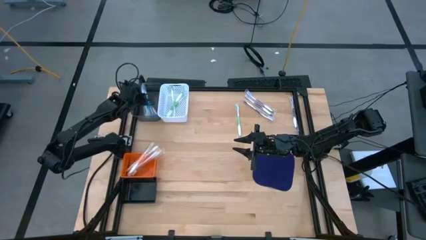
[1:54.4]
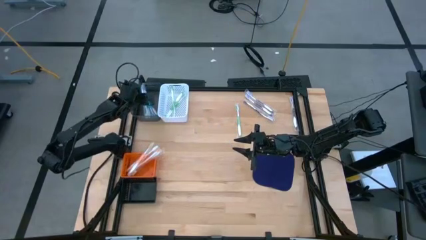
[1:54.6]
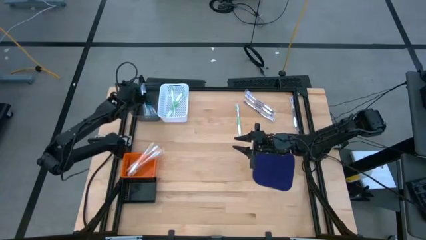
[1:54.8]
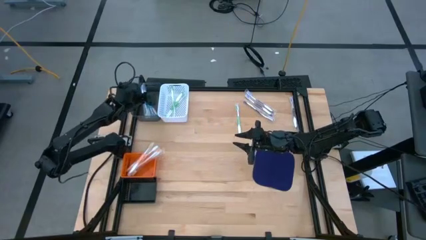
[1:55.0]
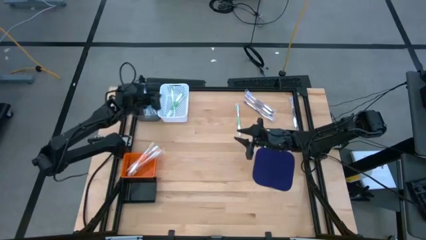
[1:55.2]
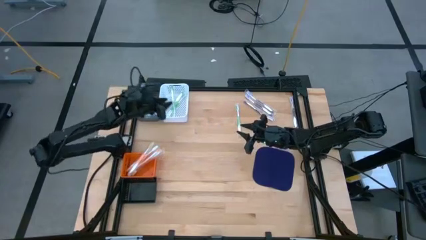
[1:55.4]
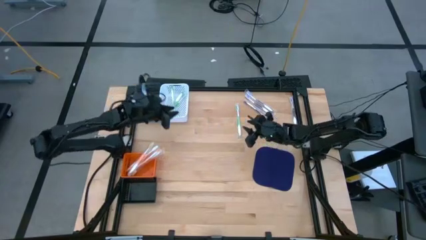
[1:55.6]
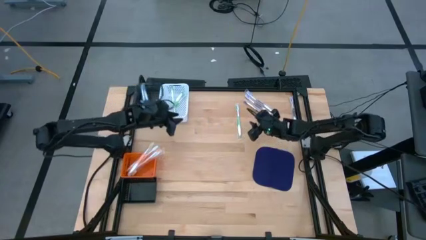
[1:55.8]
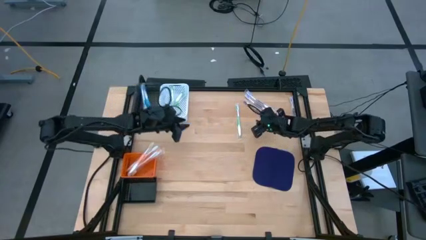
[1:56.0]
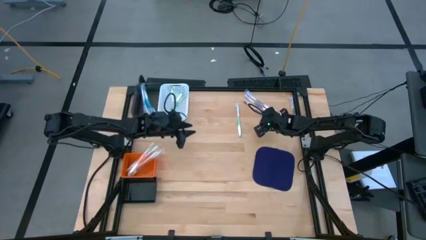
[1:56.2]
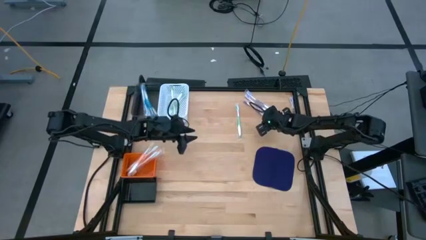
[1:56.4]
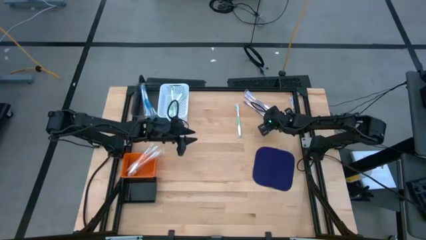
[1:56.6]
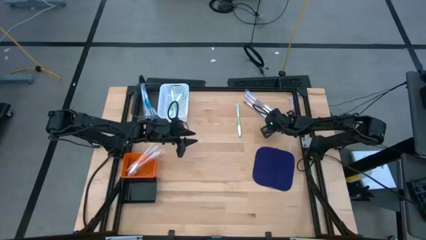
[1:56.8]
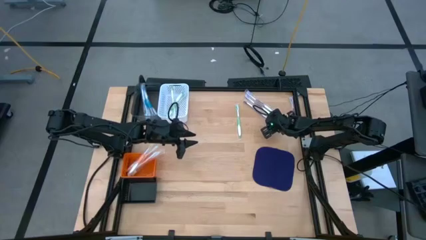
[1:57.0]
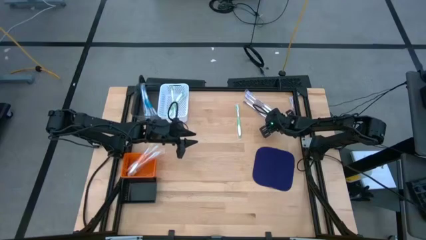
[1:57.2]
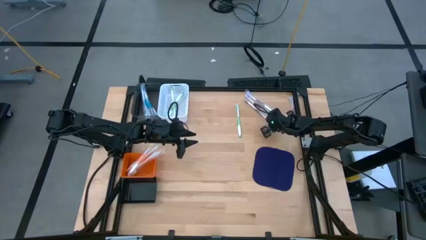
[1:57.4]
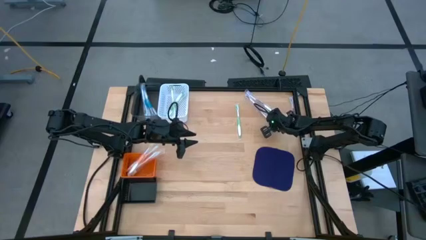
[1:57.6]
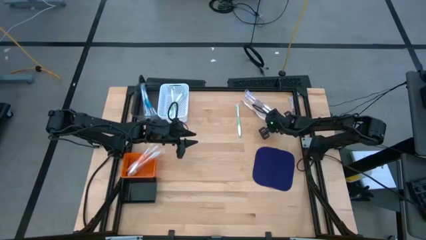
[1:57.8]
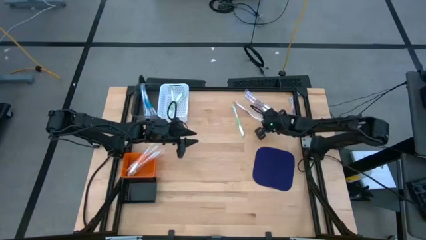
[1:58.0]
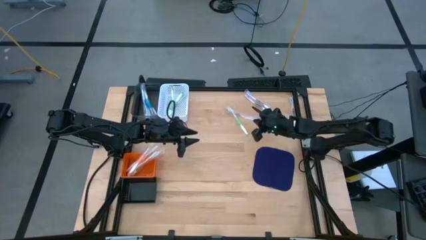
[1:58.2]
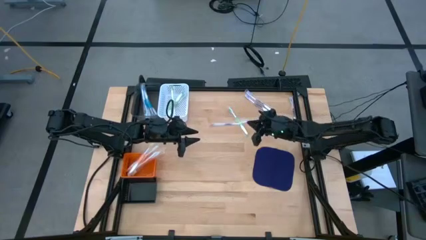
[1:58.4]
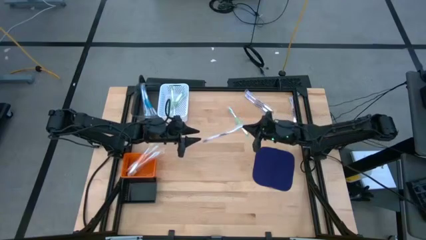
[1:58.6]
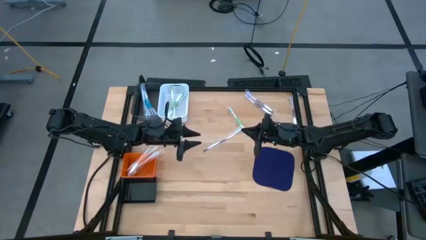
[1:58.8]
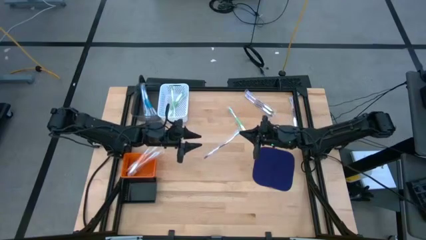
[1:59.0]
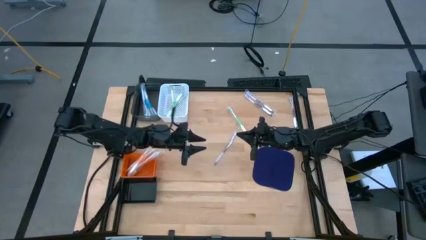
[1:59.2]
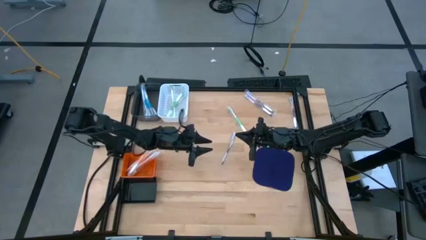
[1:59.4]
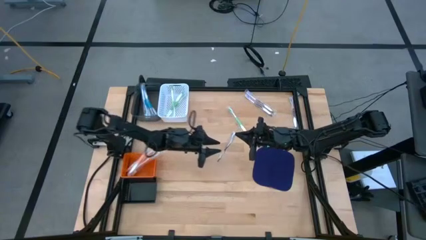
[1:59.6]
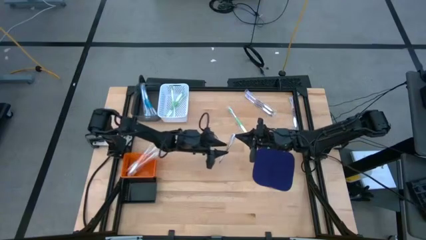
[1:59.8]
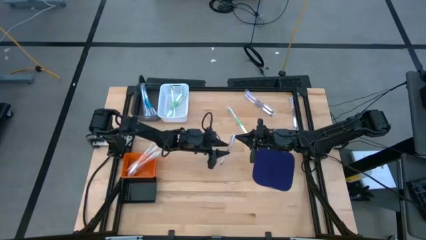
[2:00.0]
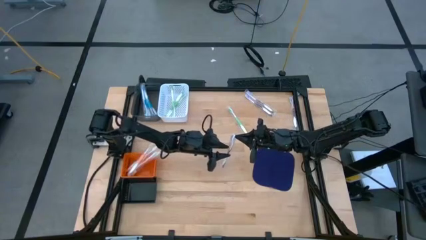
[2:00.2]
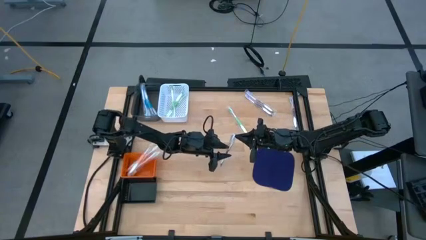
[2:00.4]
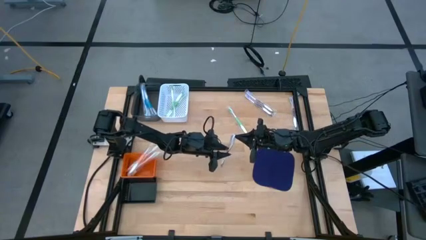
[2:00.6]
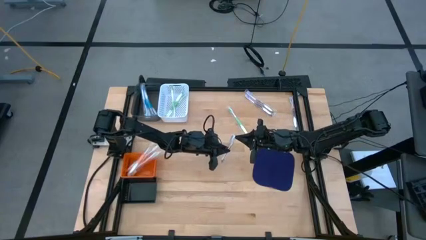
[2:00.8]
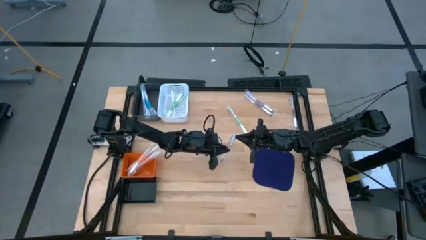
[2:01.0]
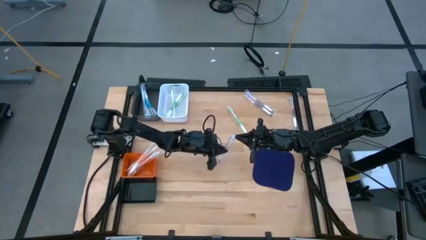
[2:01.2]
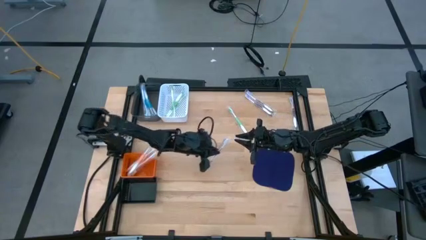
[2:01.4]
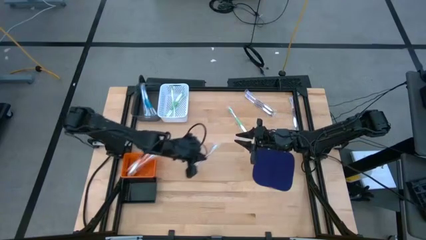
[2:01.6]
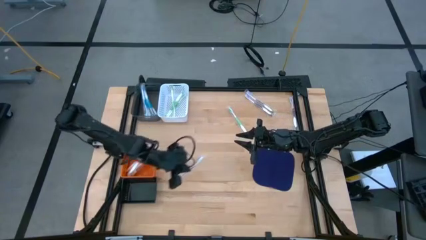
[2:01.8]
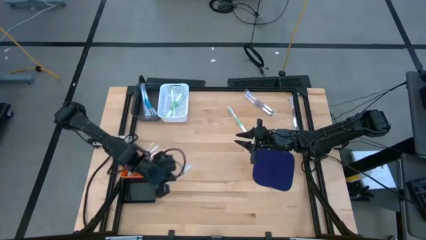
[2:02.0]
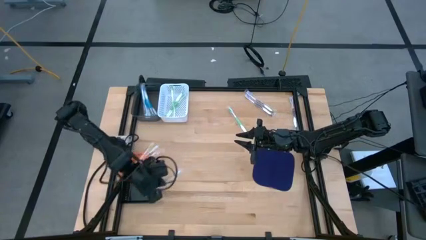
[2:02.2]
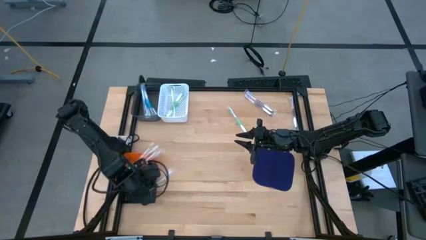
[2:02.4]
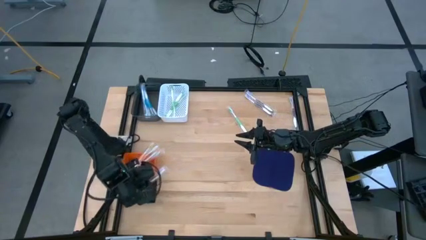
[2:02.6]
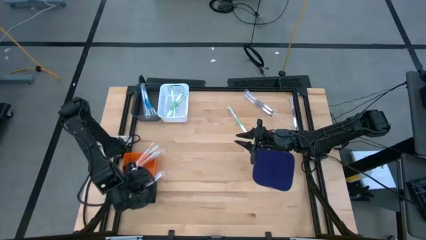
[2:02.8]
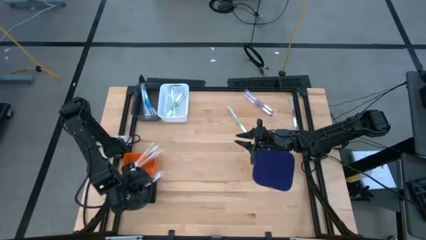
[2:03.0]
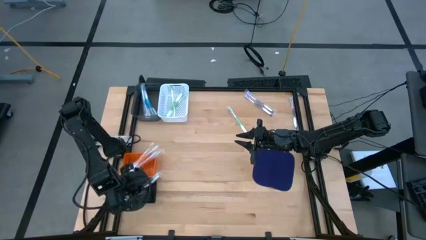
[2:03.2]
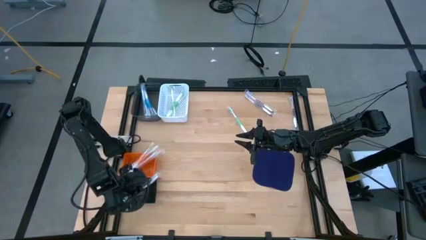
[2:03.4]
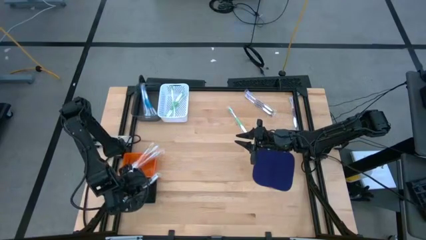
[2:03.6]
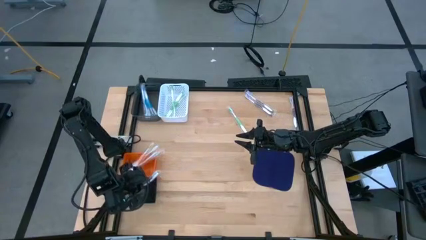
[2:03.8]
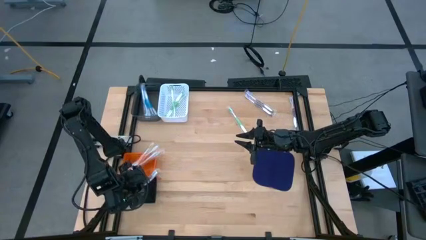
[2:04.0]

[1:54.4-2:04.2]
Task: Pick & Place Toothbrushes
Put the violet toothbrush into the black bin

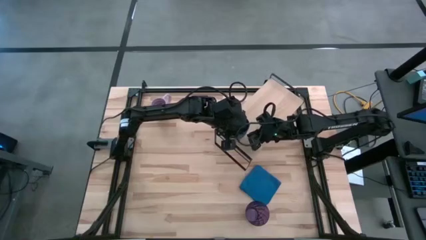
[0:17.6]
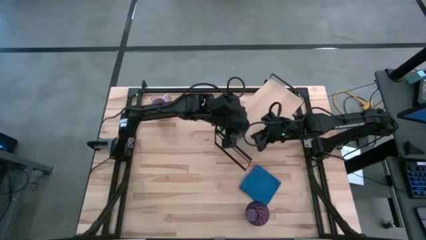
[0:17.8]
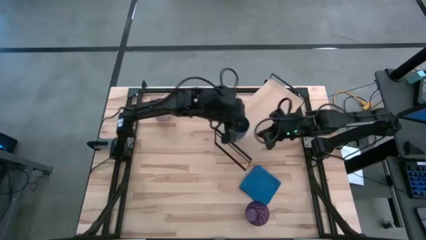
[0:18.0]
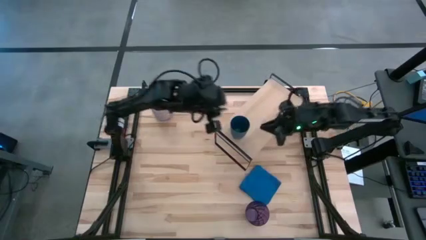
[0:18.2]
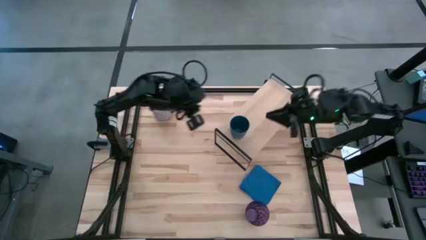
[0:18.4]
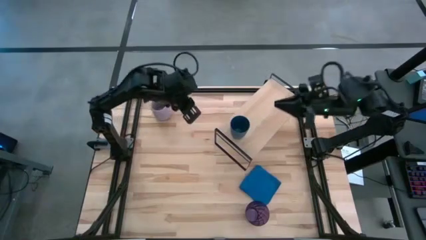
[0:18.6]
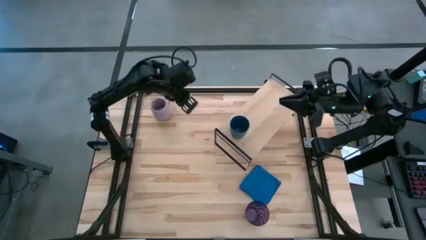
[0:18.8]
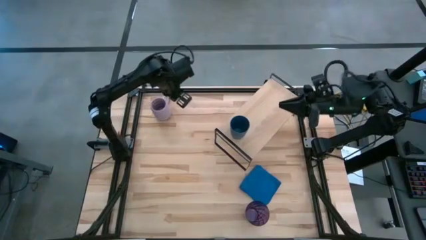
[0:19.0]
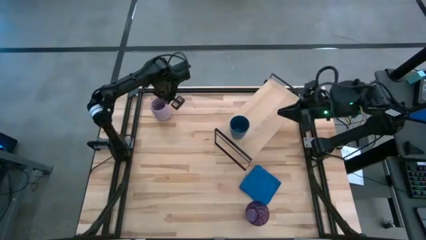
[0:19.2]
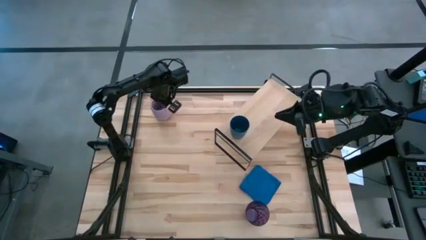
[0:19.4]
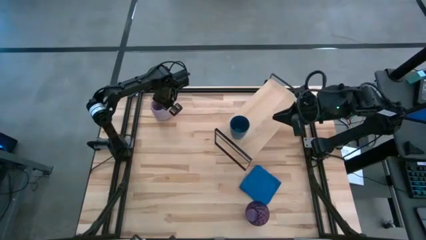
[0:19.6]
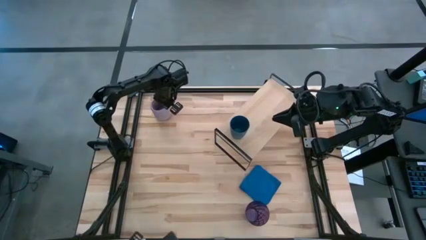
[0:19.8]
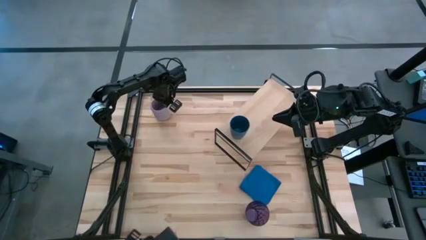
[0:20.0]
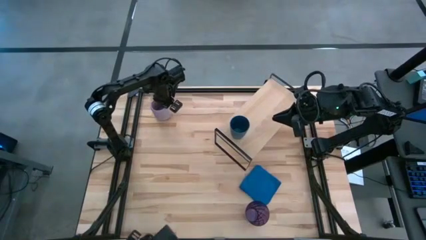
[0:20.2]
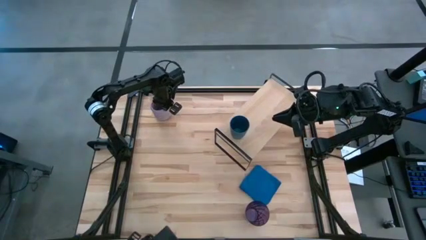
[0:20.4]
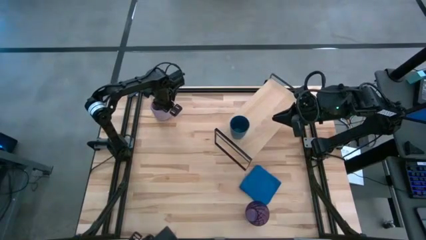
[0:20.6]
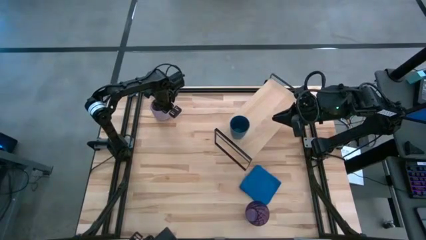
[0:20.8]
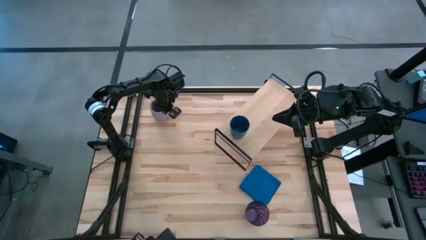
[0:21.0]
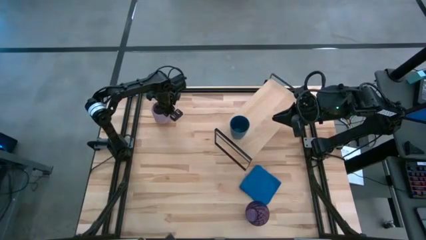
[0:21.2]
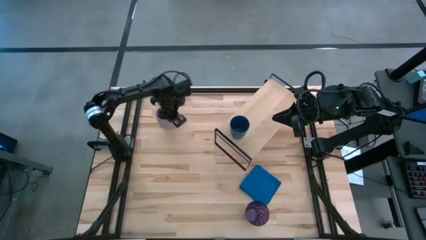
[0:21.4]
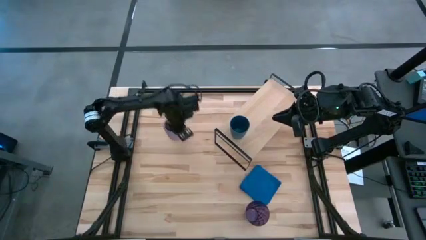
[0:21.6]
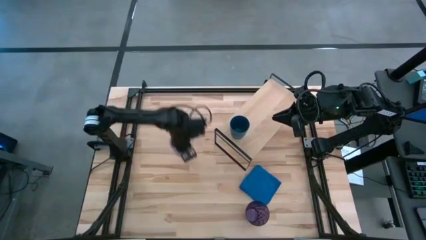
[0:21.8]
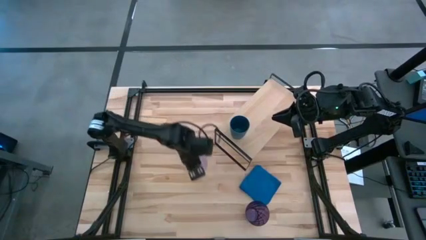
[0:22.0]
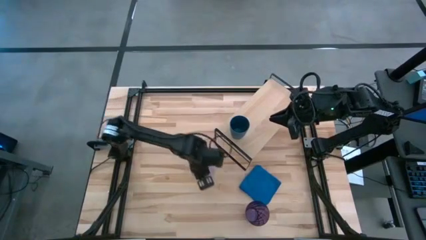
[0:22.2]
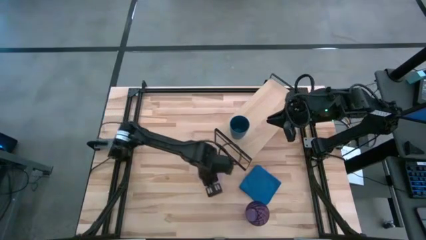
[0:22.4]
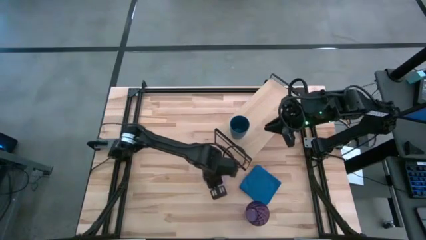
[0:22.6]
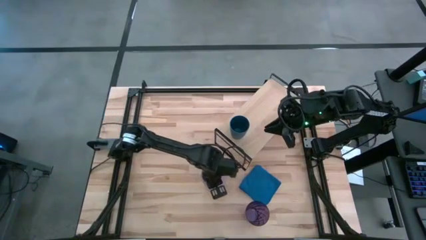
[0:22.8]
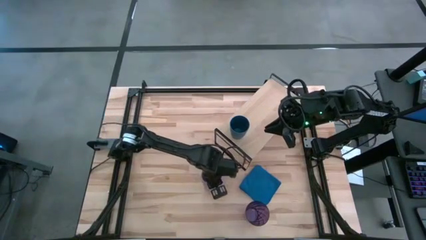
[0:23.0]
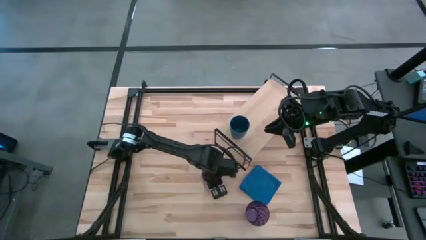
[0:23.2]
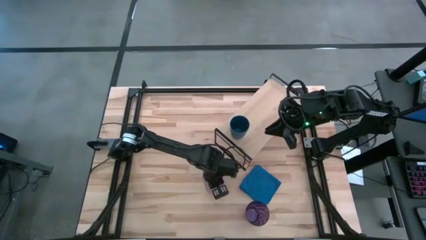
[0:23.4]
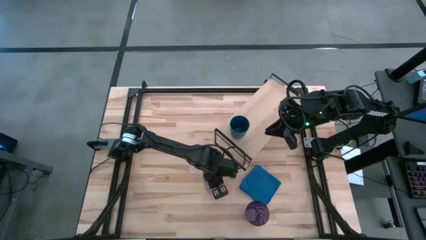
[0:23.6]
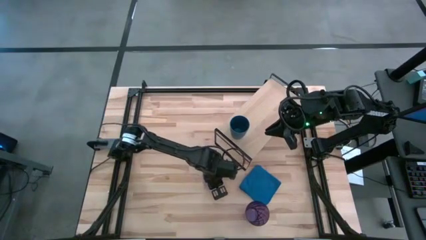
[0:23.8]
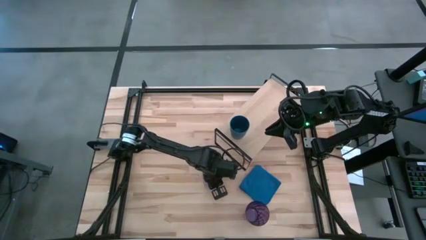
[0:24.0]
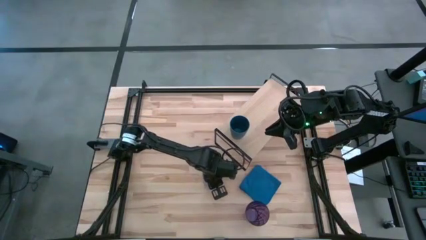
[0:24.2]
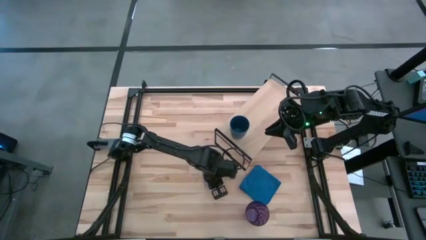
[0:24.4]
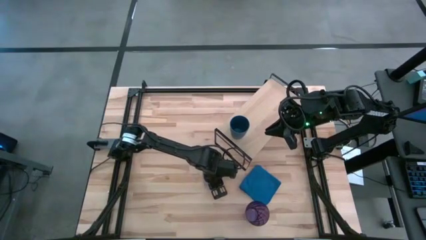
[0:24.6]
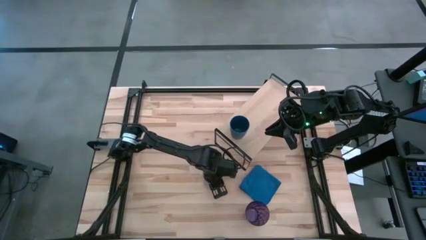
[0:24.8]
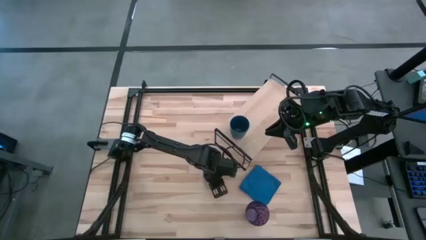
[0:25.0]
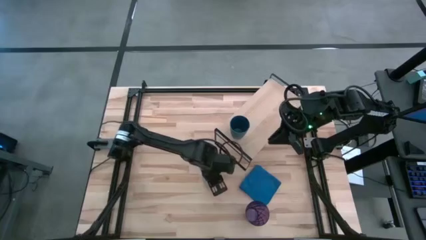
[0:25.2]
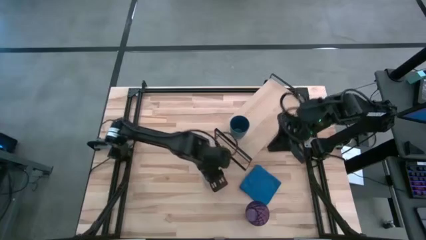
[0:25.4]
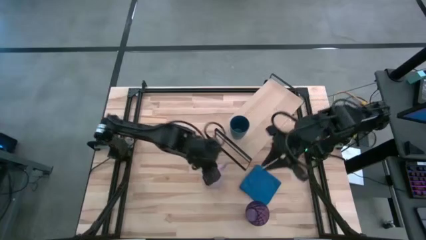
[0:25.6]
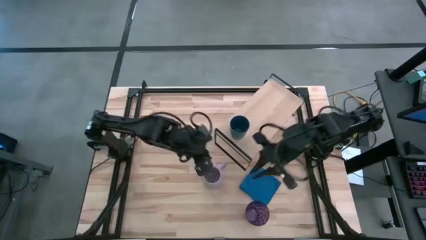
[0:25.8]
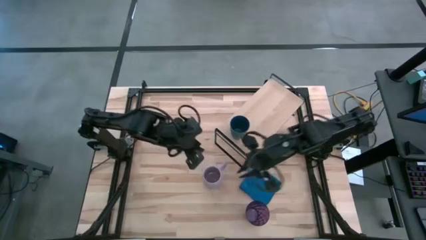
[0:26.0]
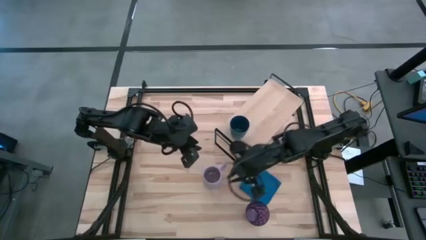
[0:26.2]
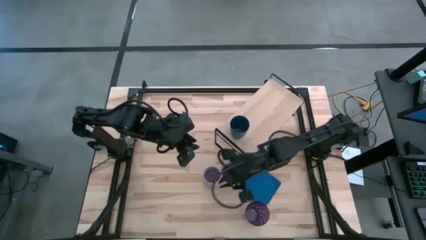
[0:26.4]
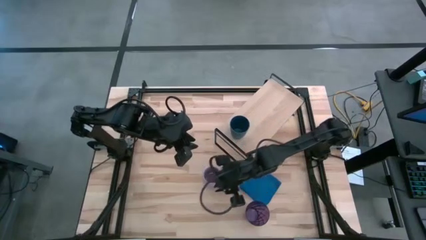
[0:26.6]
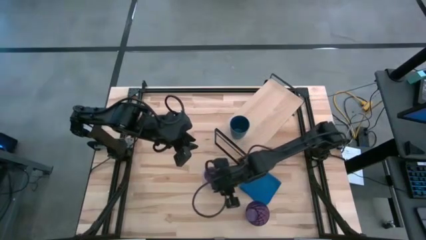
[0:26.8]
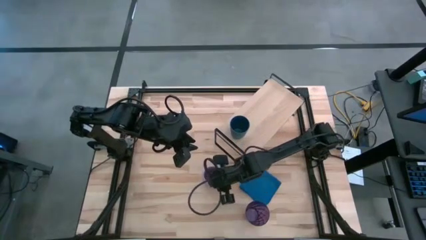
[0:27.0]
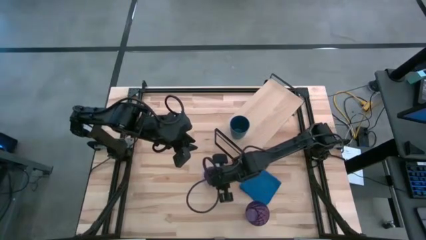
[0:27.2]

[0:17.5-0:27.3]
Task: Stack small to large cups/mugs on shelf
Put the purple mug on the shelf
